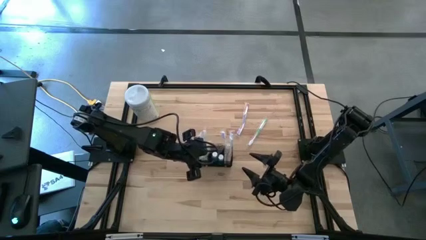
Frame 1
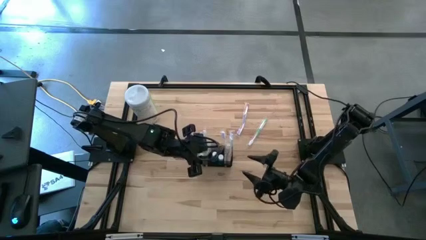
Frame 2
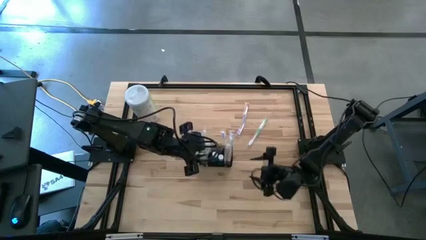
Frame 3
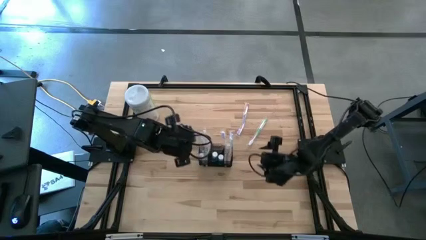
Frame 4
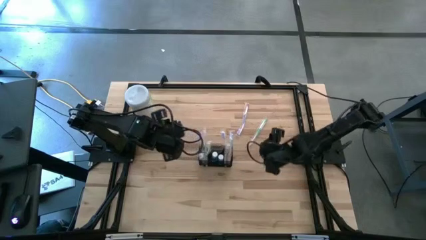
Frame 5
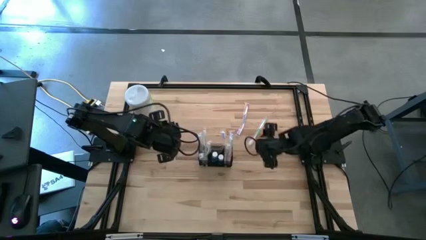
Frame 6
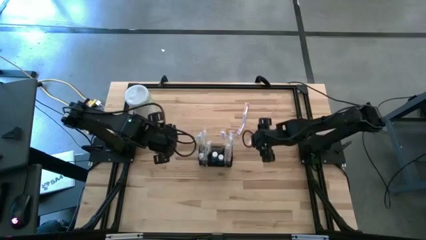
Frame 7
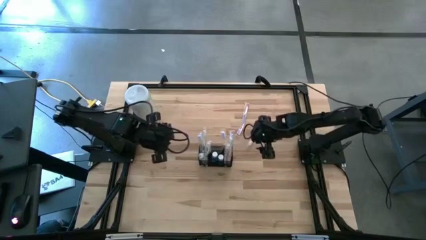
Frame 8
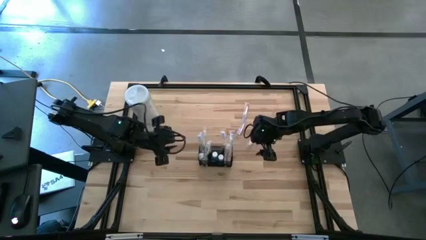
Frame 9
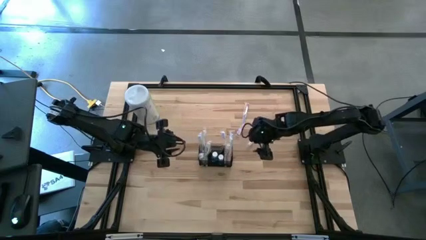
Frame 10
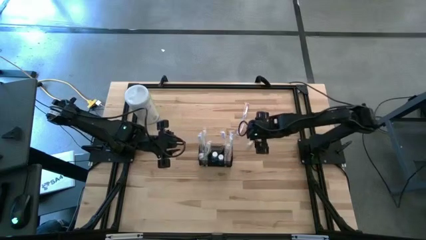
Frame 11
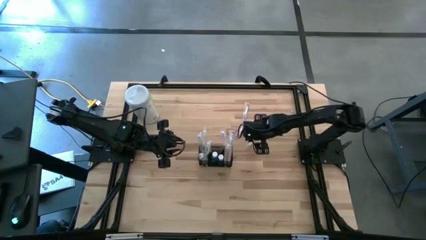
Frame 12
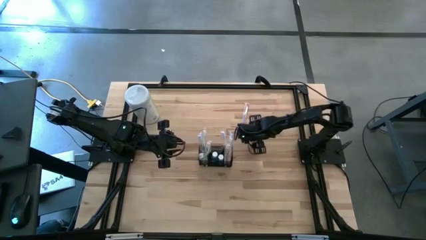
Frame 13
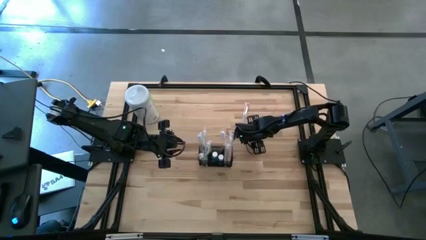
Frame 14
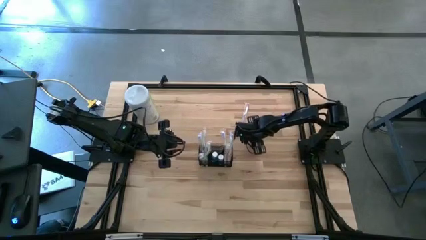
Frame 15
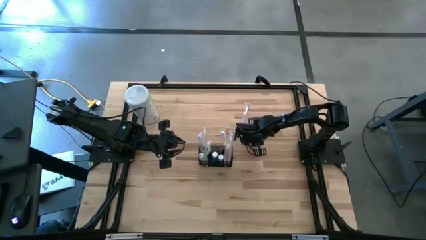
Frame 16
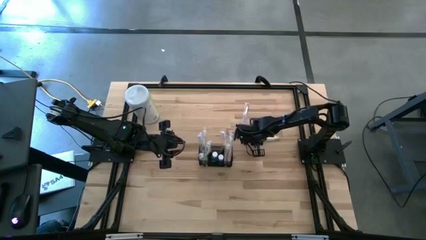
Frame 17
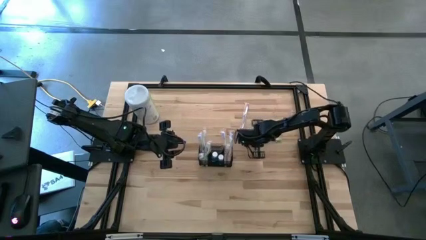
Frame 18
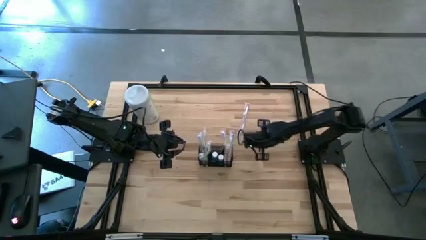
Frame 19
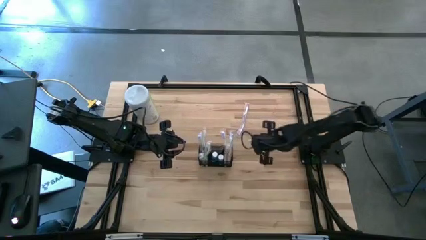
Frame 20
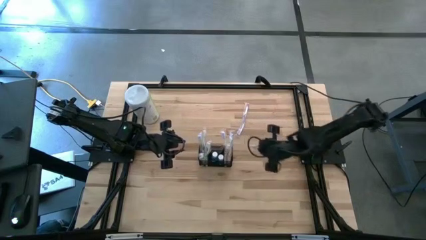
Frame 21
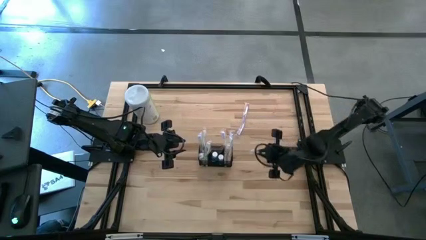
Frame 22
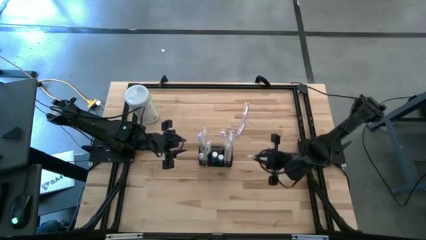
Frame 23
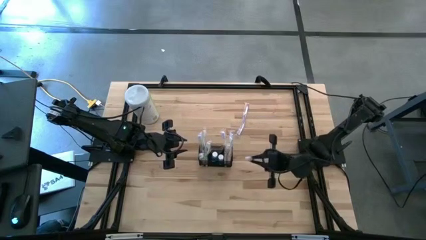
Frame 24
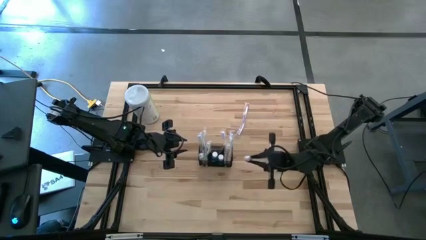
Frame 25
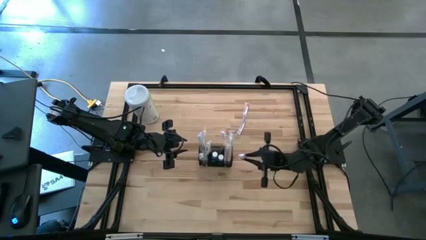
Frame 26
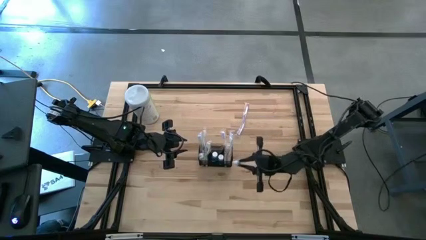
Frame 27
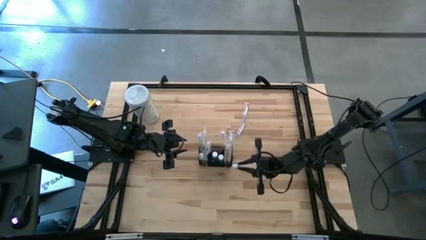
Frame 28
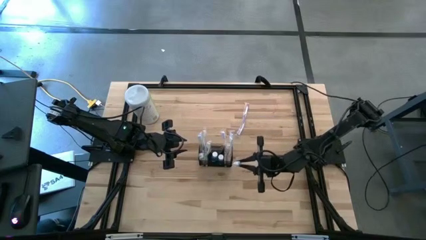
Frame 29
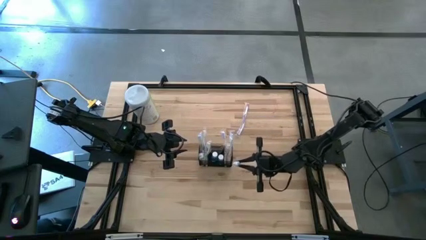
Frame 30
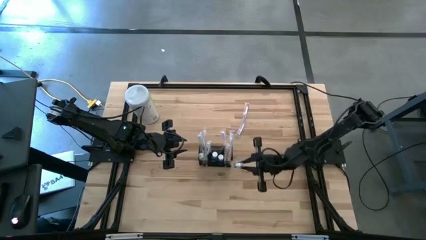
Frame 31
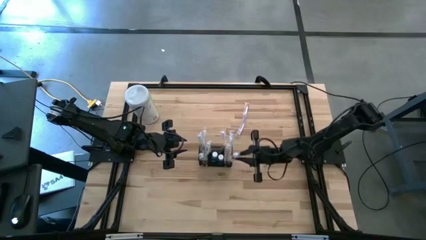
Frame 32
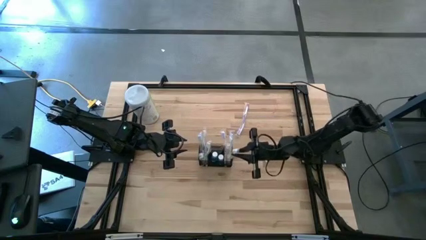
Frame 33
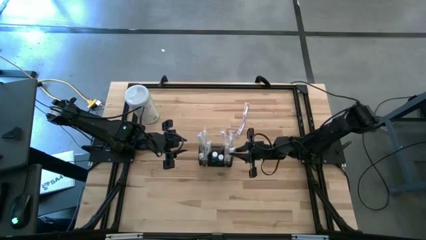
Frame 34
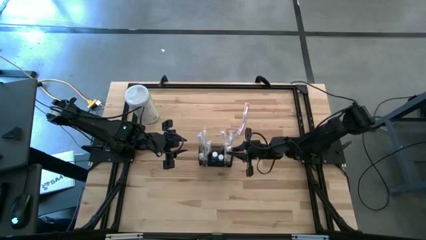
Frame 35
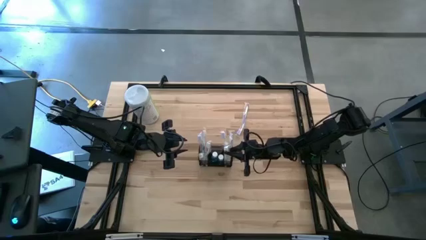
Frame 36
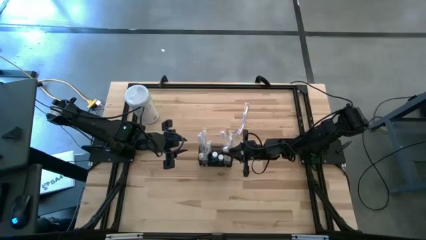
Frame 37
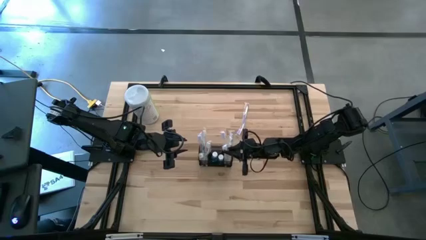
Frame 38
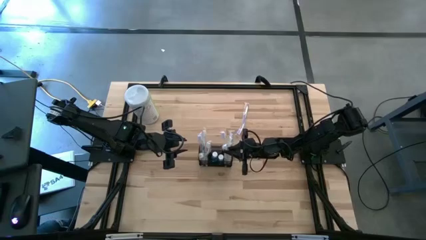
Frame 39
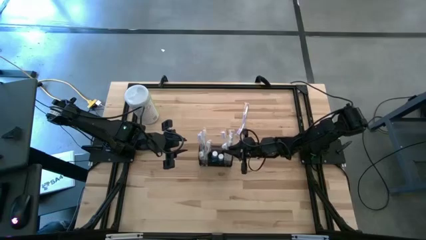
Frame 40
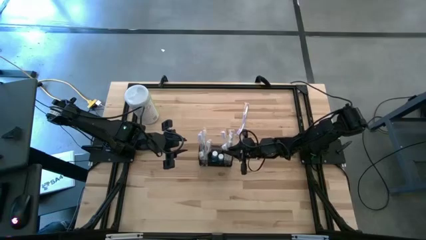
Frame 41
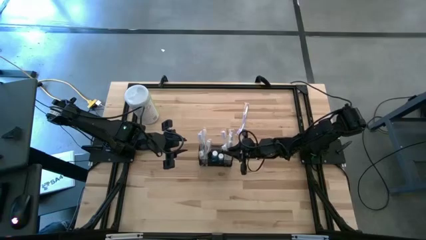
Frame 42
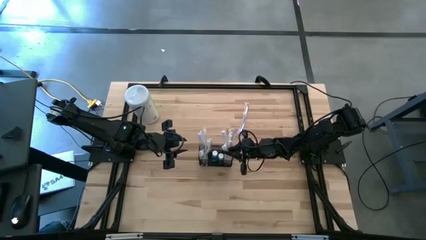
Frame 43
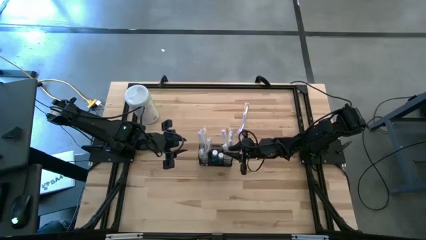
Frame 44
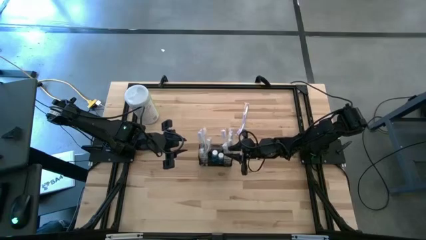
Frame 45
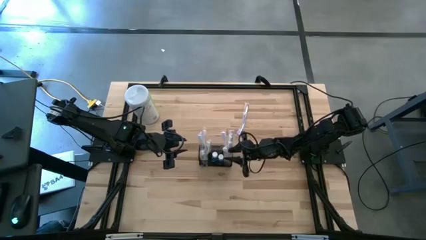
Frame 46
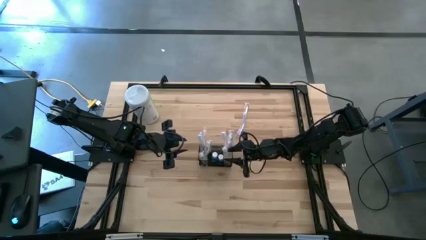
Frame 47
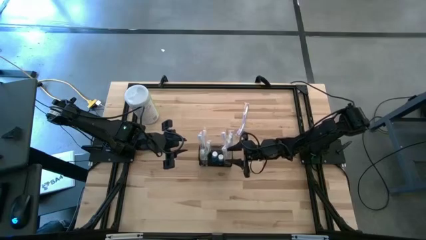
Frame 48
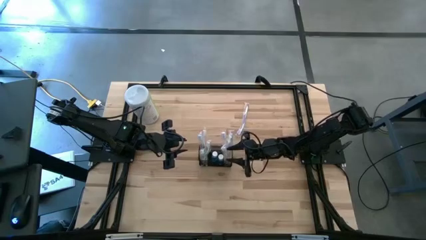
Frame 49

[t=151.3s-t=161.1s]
Task: Pick & Place toothbrushing station
Put the green toothbrush into the black mesh

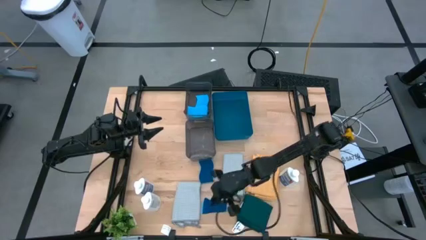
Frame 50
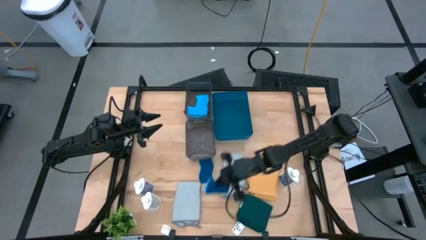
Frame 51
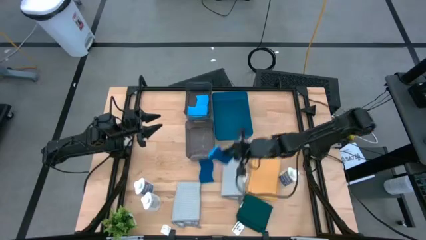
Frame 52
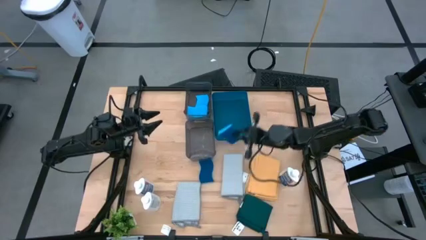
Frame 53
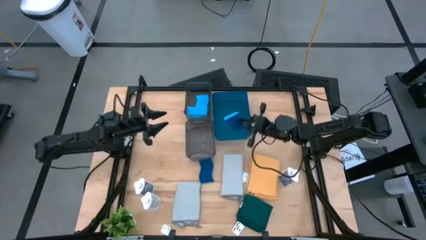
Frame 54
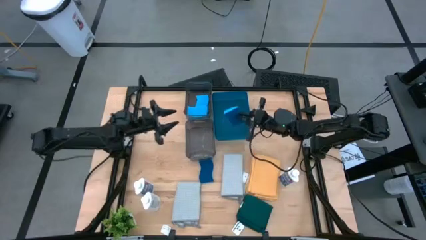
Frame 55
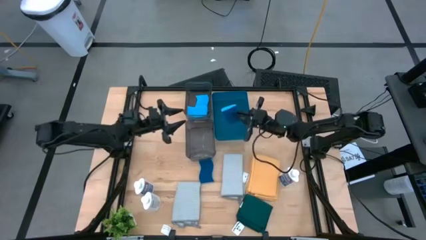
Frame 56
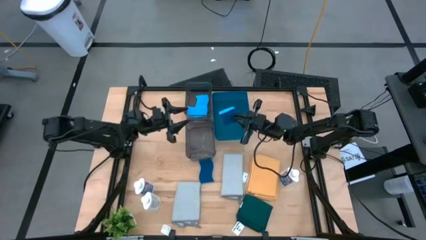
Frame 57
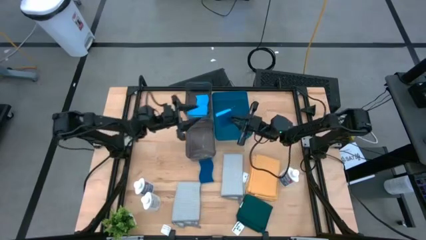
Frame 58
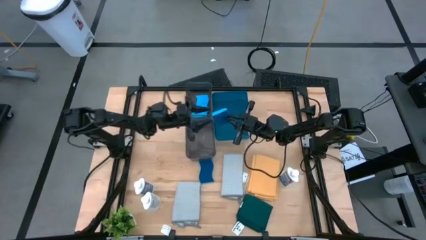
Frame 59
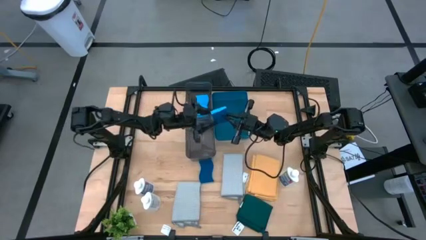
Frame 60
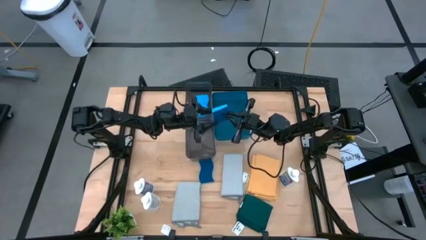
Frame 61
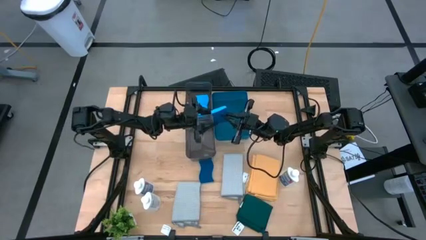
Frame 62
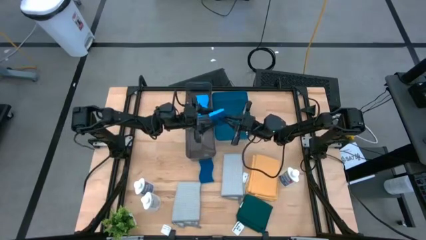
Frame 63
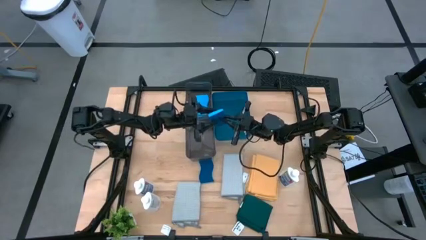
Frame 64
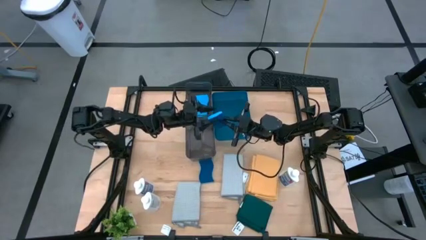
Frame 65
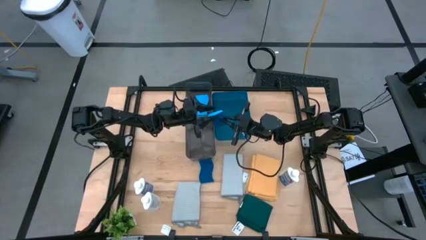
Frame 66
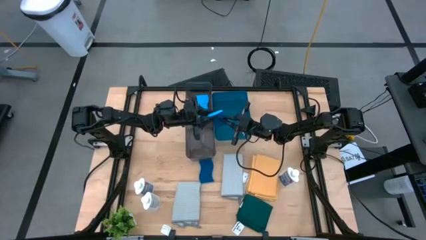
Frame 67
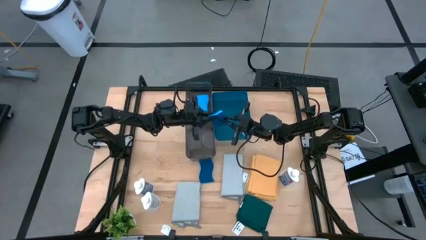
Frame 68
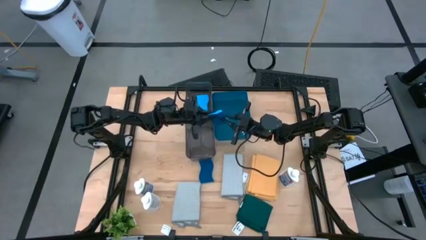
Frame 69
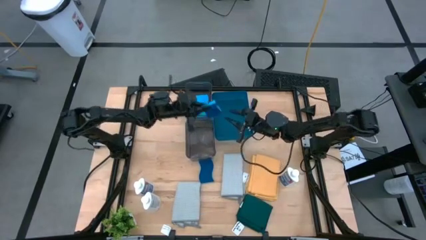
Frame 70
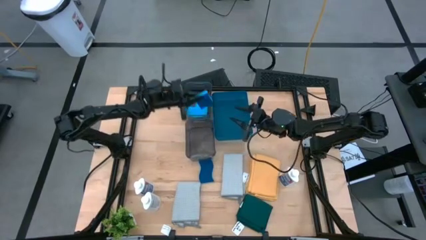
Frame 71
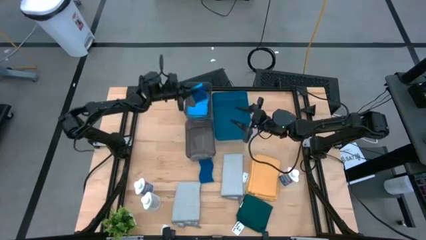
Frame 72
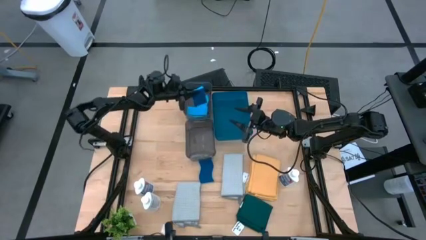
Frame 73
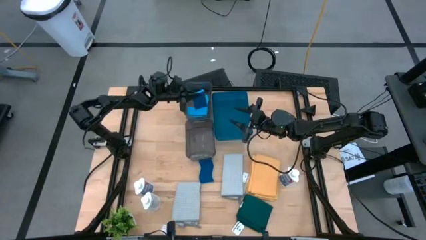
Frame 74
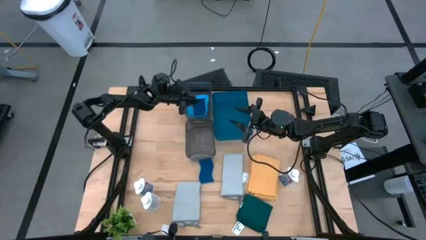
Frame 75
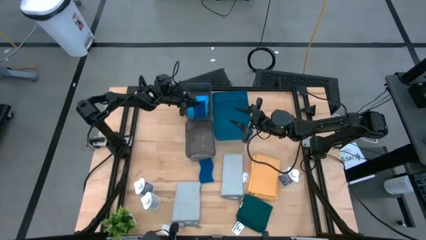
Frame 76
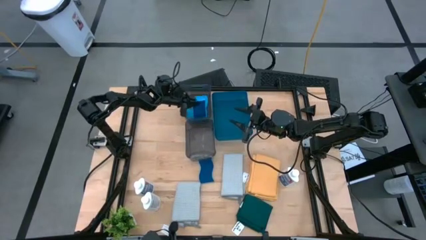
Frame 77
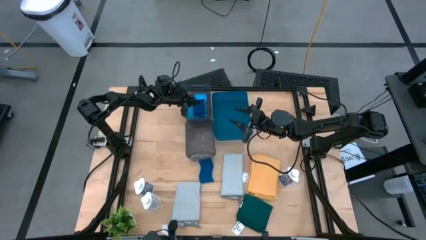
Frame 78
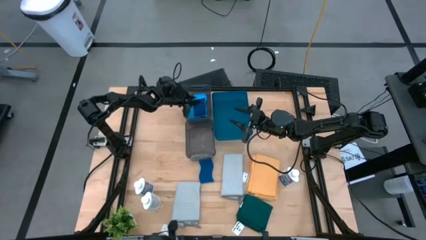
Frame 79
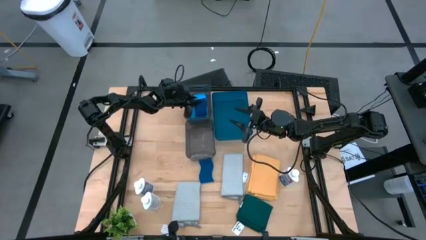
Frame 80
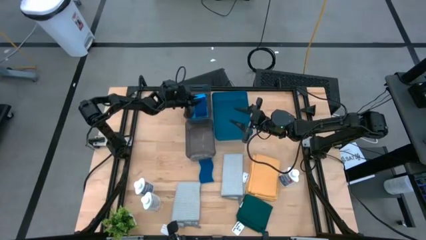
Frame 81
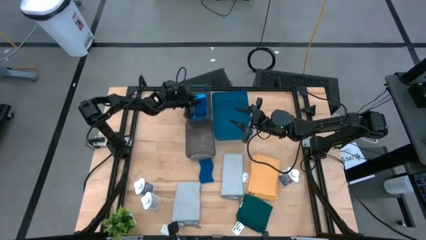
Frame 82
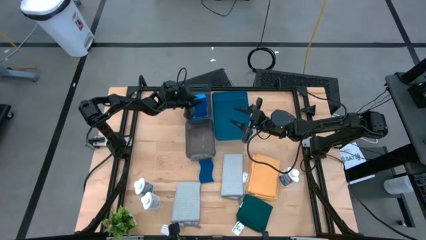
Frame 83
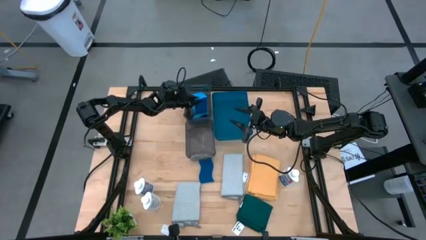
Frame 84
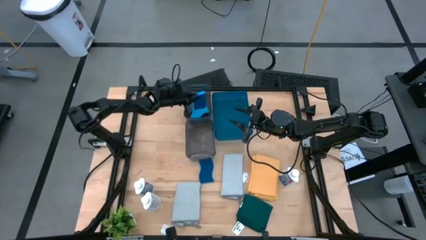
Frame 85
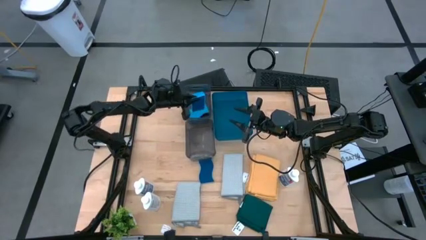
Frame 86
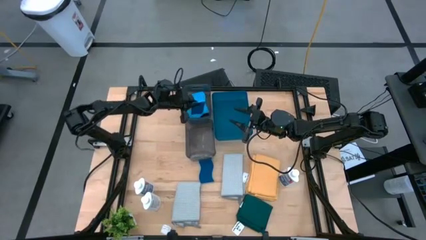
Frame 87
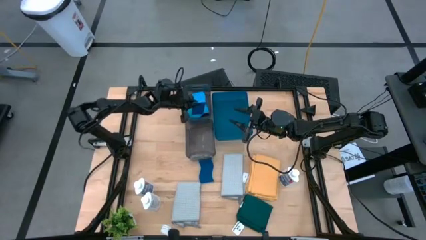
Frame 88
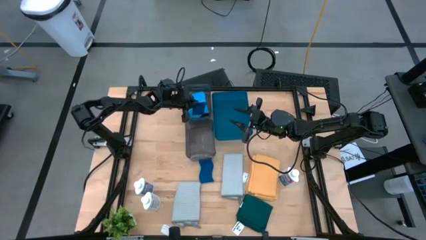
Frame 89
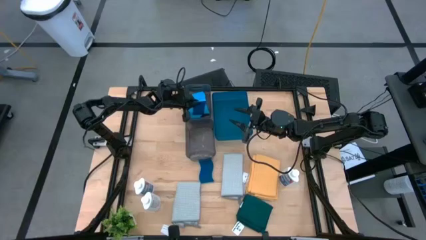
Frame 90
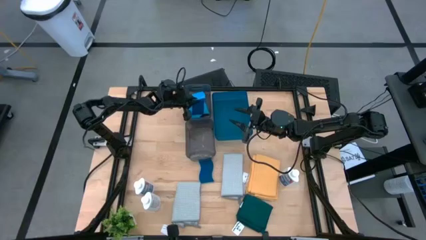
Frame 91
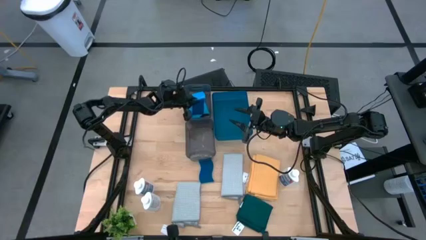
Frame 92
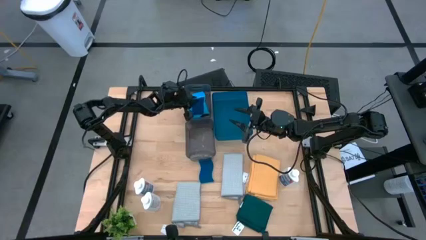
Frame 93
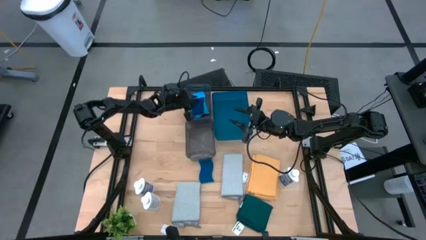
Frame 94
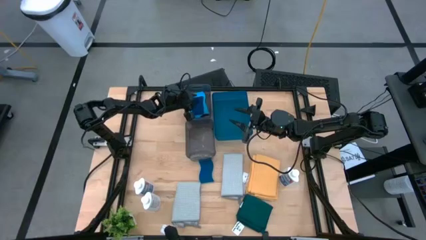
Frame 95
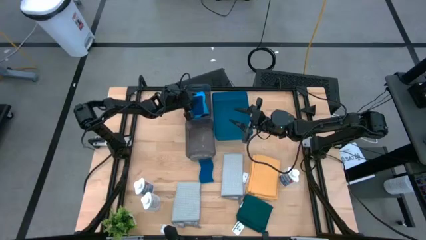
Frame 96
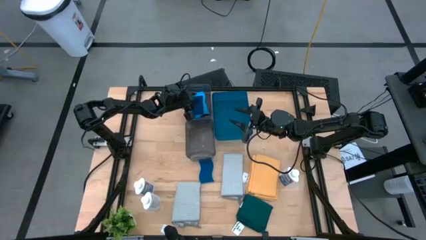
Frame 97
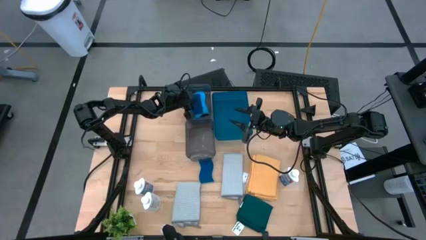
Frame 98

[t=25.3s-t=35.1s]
Task: Pick & Place Kitchen Items
Put the blue sponge into the top black bin
